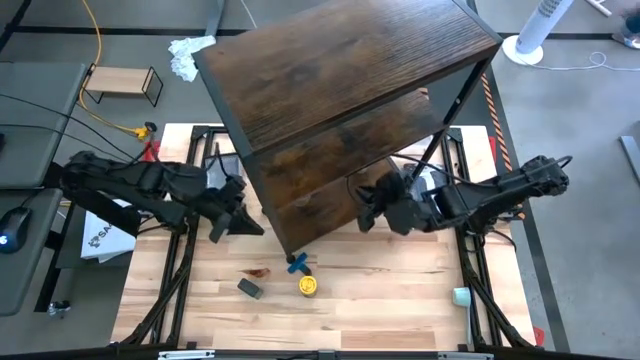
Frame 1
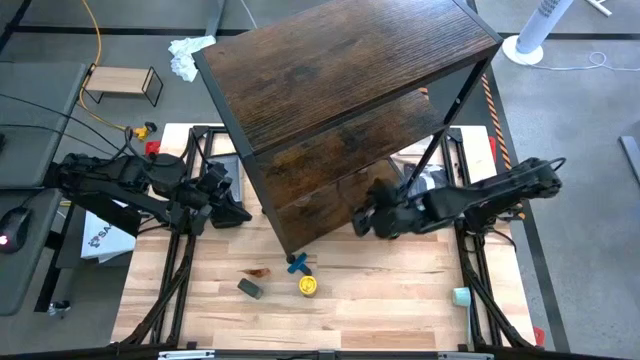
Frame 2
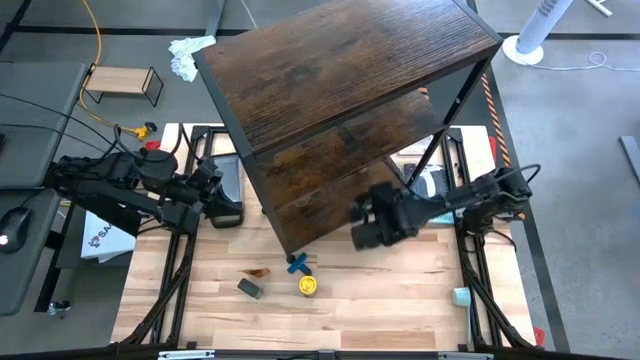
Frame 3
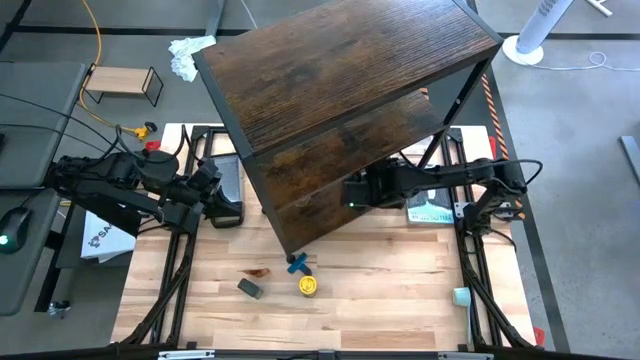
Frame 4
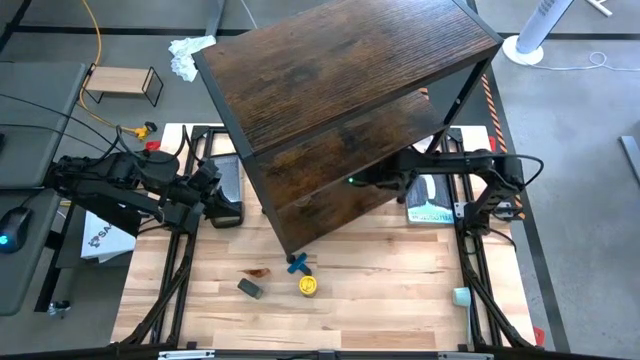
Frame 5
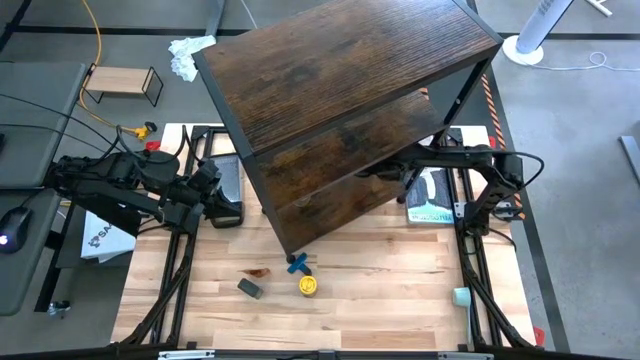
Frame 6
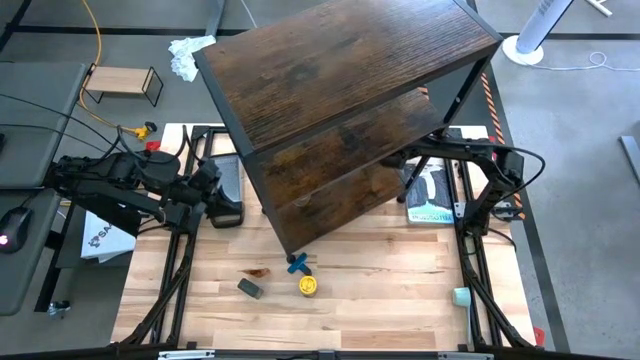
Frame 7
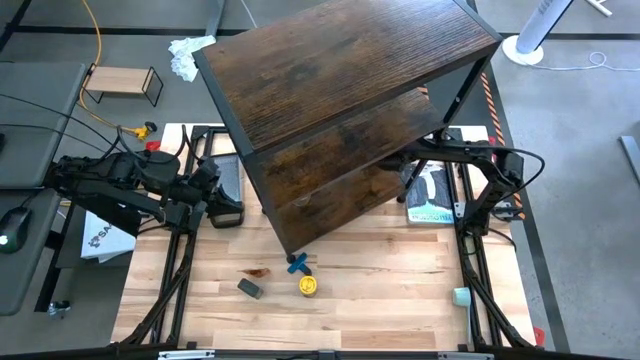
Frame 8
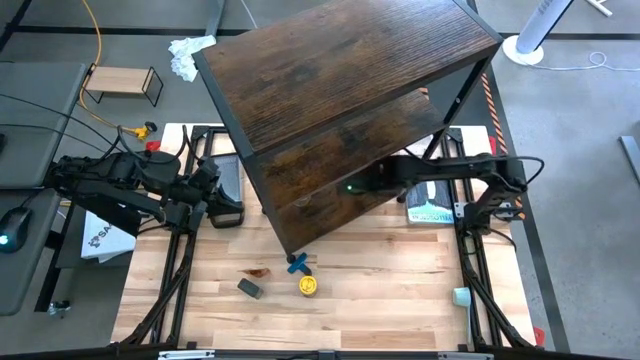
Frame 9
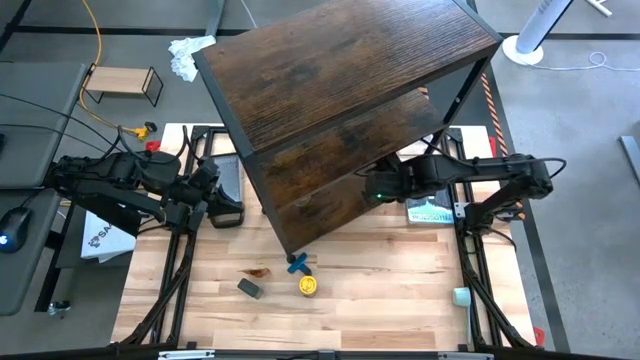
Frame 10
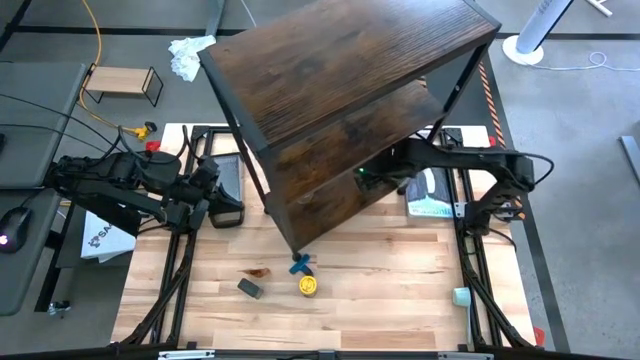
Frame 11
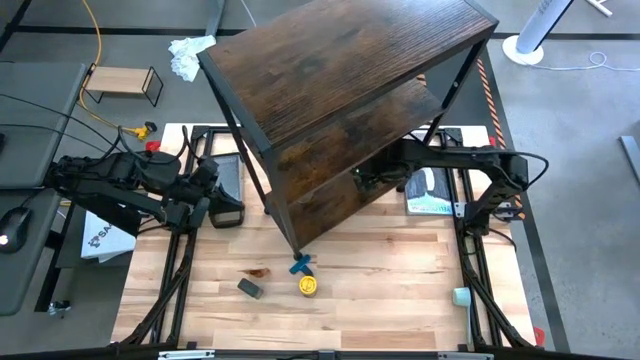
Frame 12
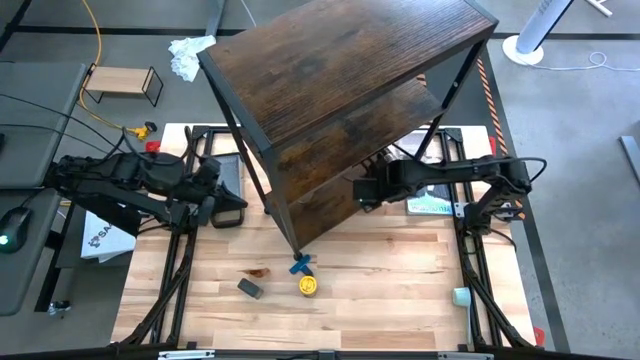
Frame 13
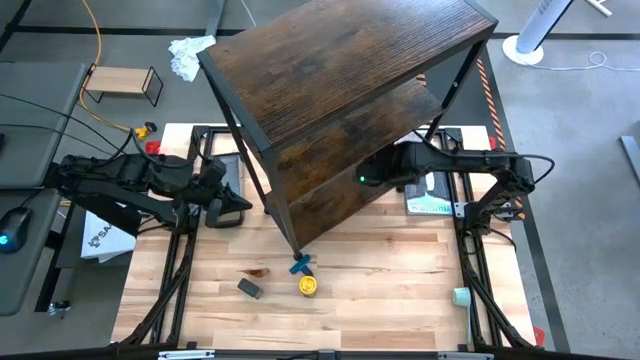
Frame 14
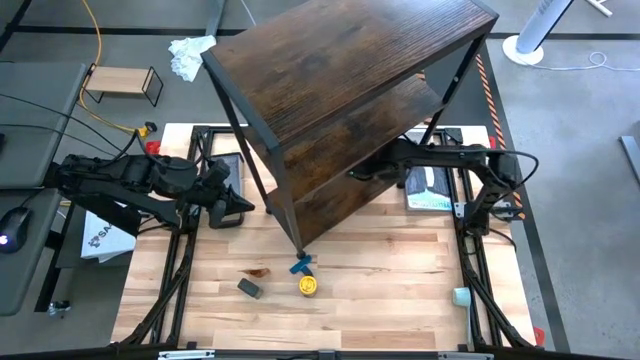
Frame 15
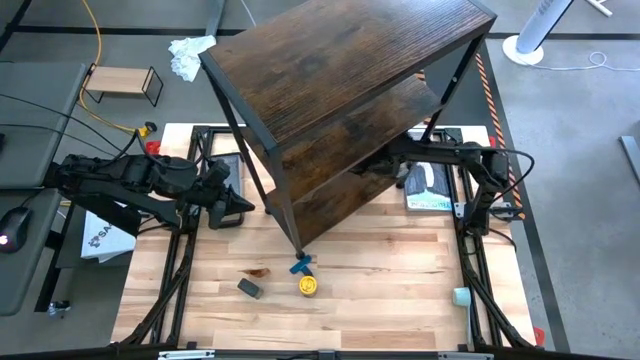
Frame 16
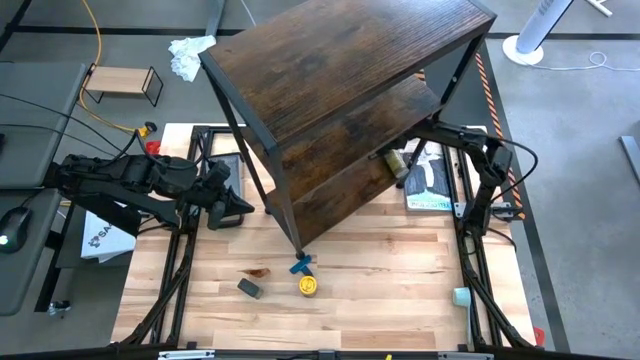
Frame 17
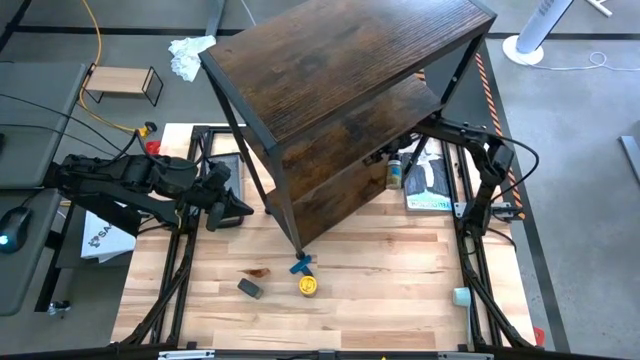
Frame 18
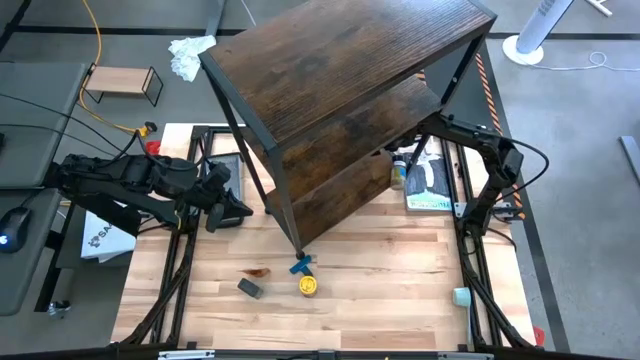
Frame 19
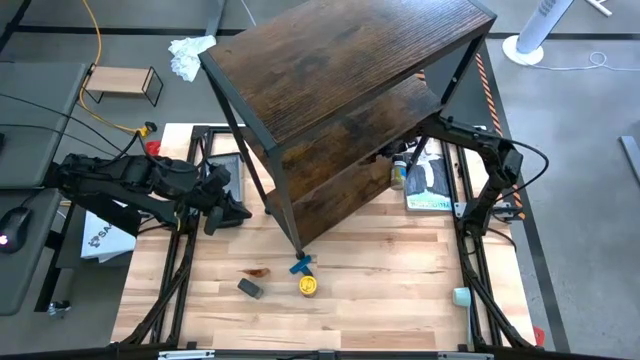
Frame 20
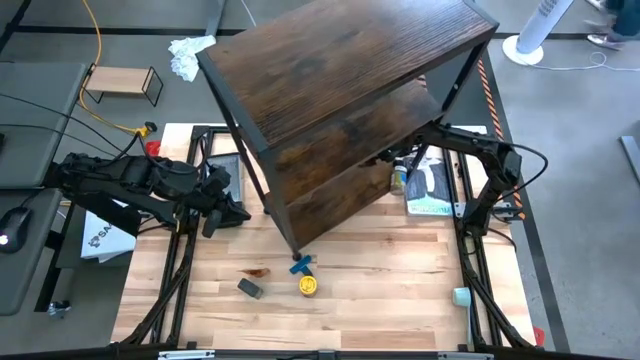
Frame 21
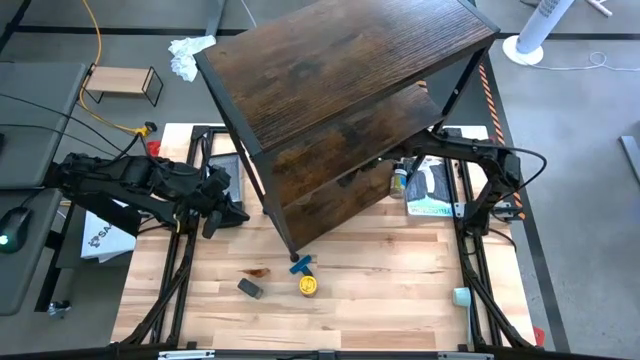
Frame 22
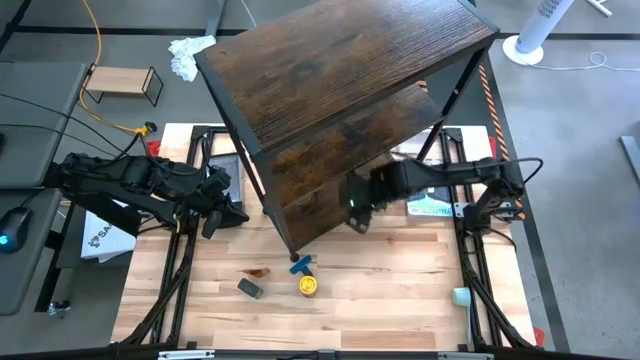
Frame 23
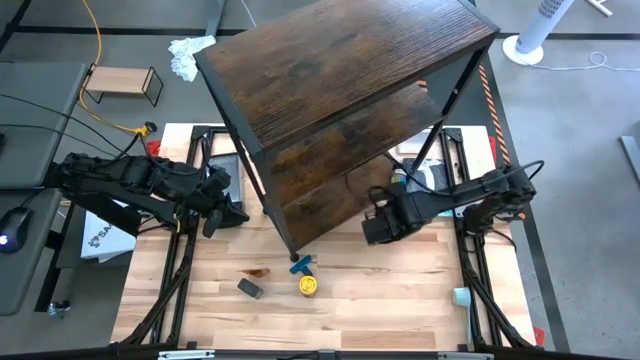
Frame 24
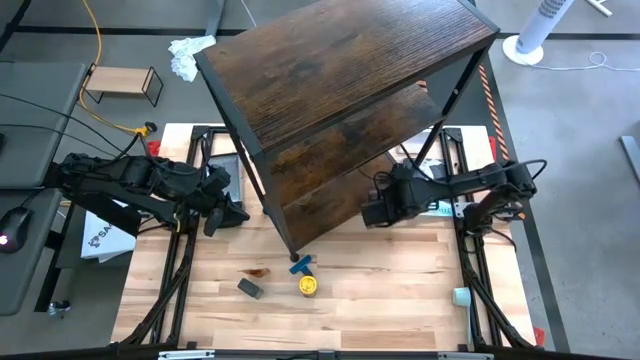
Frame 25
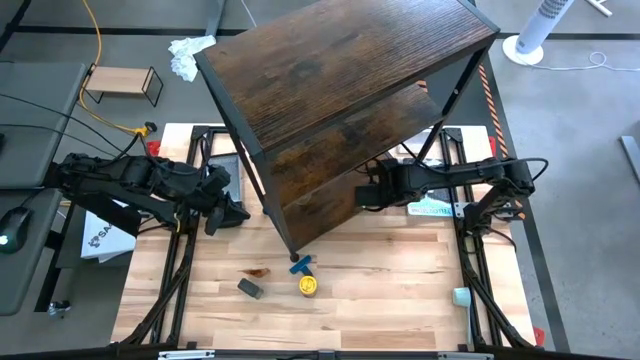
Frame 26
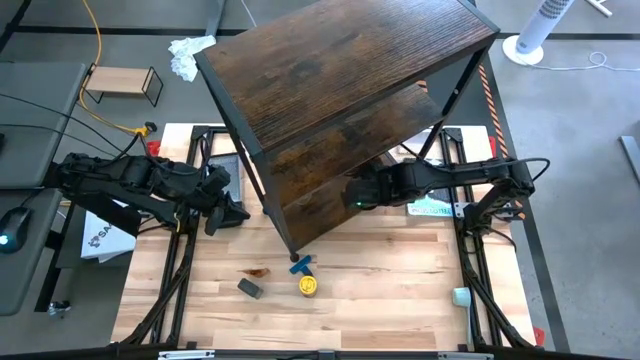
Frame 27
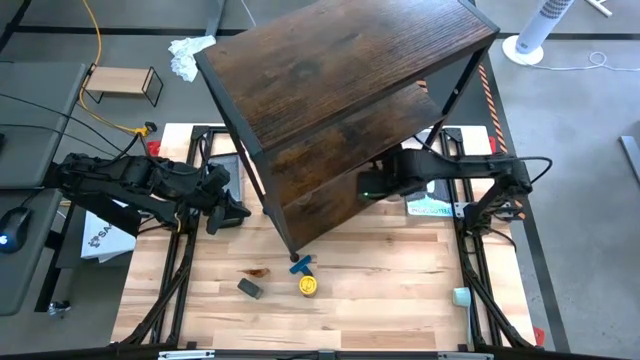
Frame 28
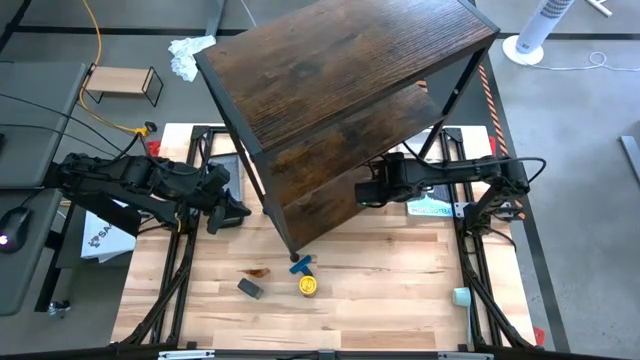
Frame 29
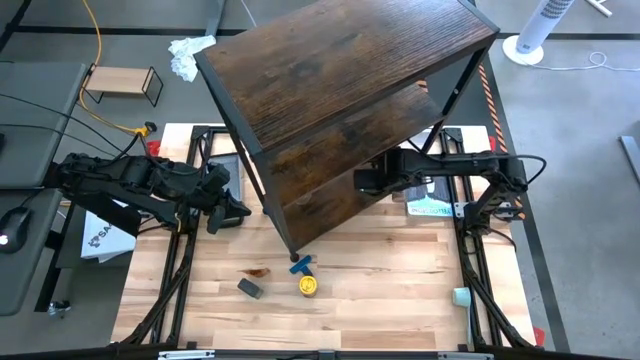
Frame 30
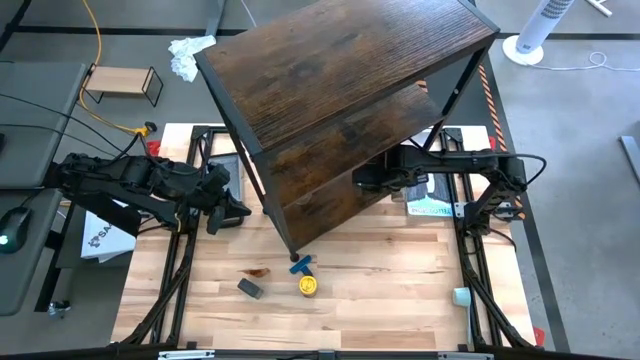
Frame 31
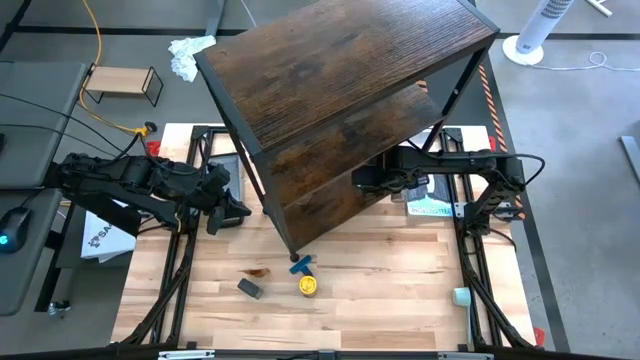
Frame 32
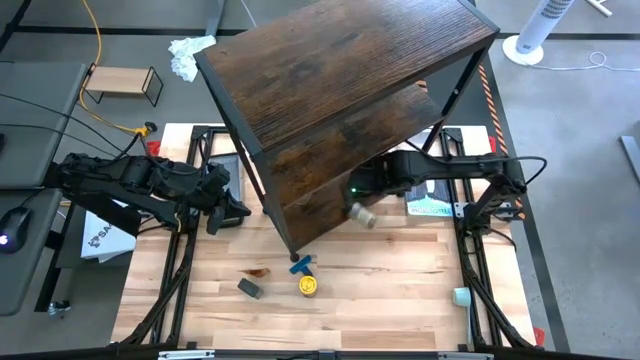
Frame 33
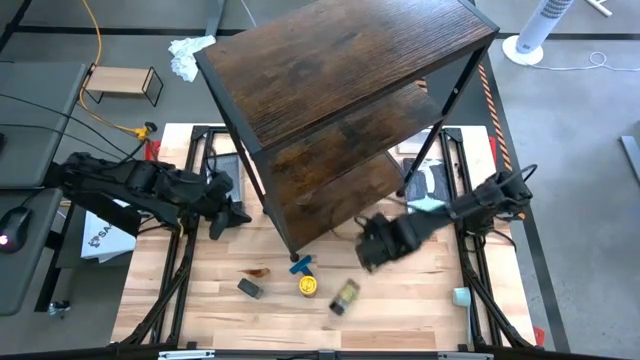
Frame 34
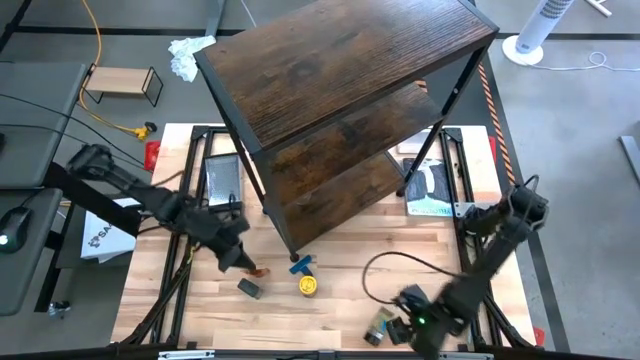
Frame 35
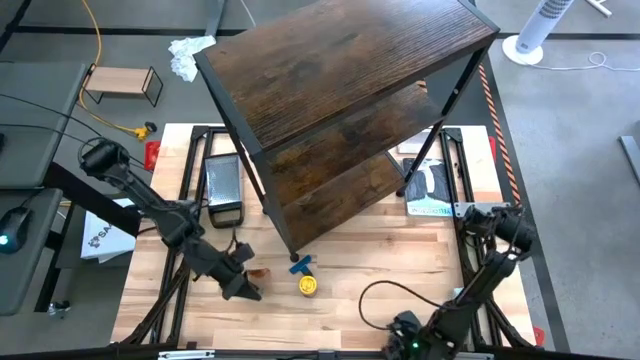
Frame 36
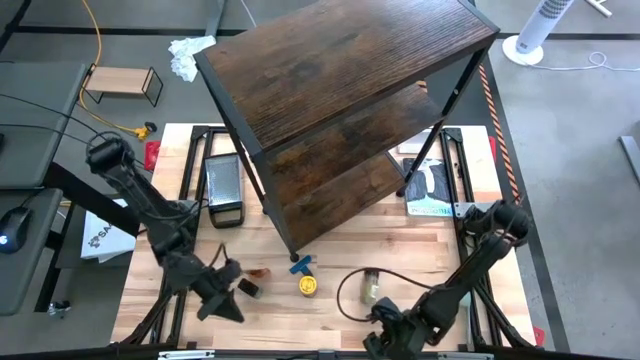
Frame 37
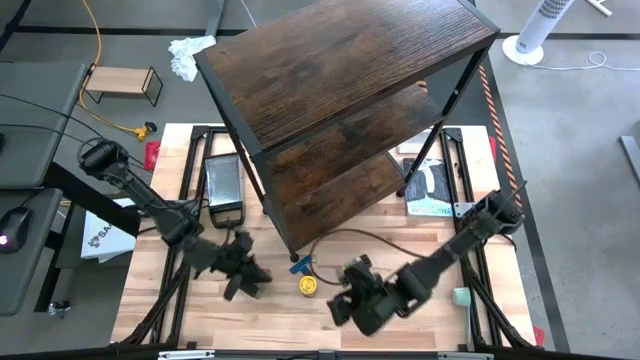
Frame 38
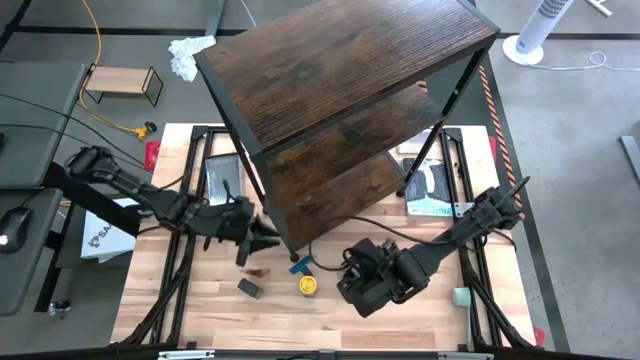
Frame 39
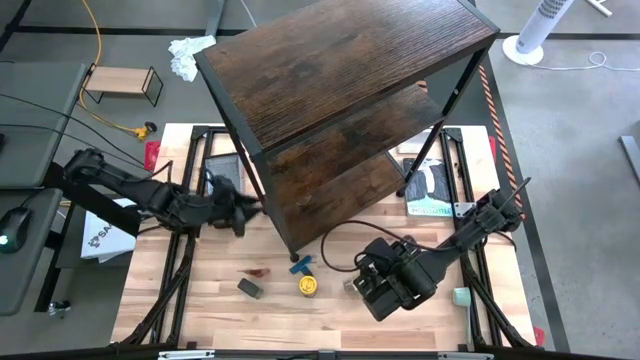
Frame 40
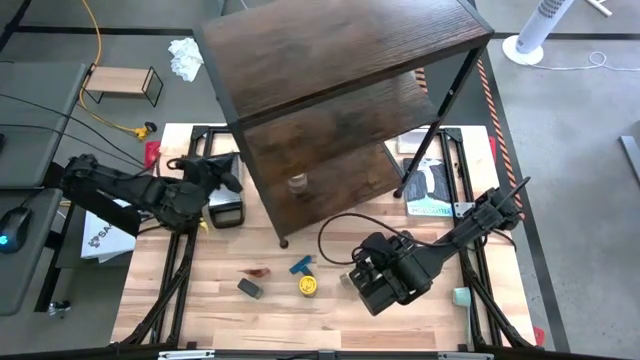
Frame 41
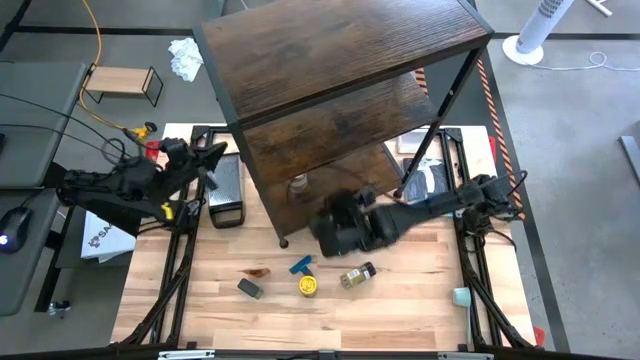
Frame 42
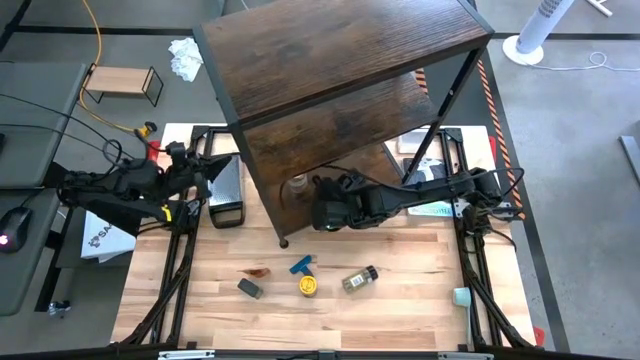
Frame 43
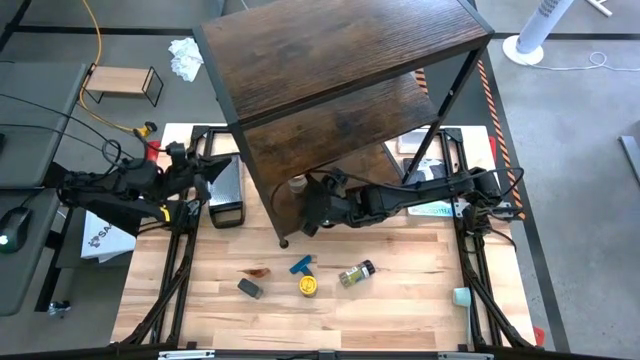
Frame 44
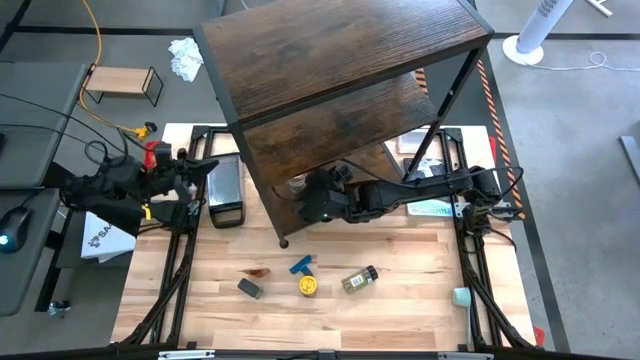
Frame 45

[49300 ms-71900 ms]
Task: Shelf spices
Remove the black seasoning bottle from the shelf
